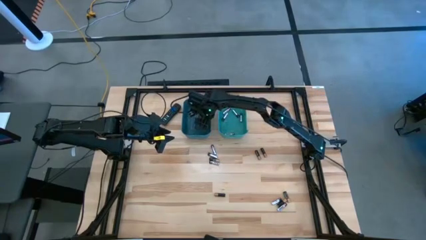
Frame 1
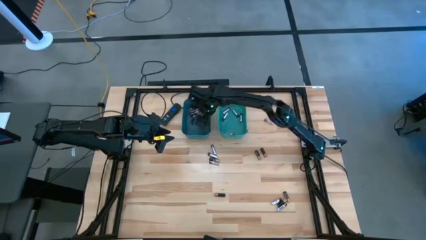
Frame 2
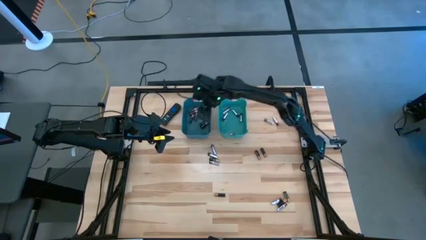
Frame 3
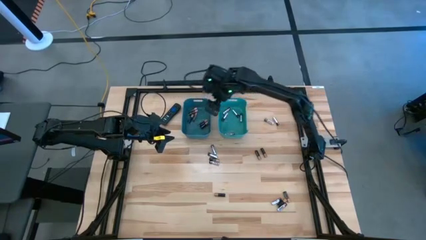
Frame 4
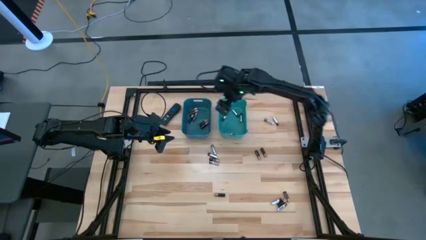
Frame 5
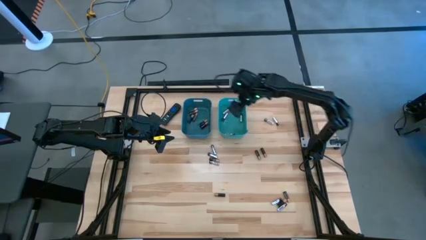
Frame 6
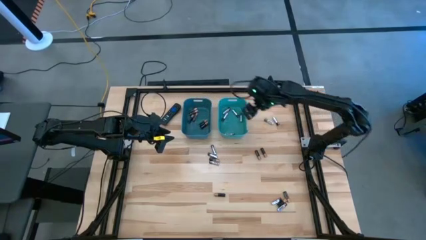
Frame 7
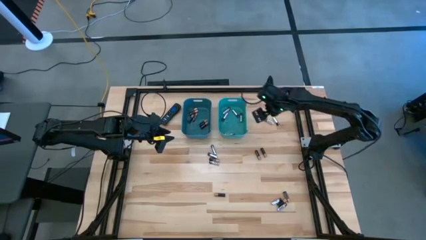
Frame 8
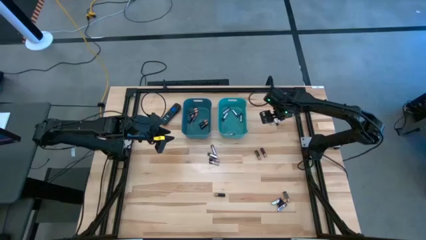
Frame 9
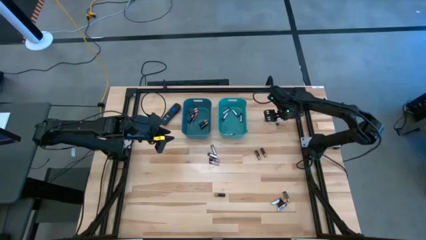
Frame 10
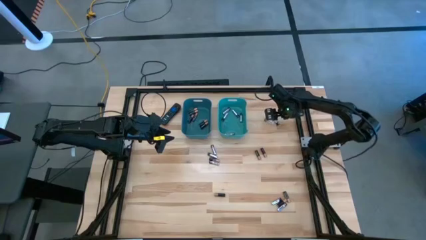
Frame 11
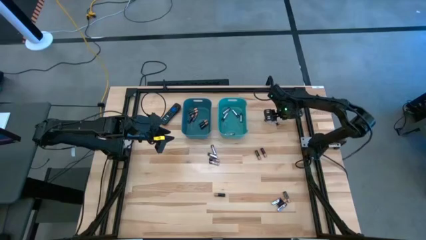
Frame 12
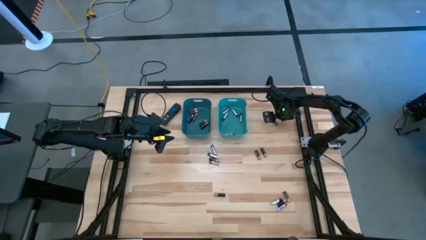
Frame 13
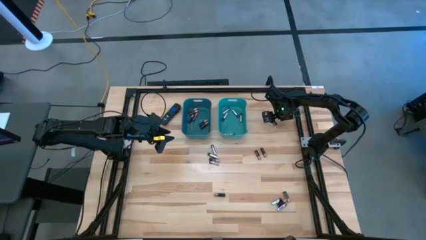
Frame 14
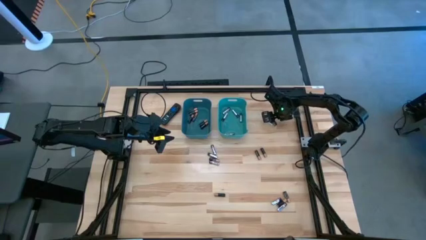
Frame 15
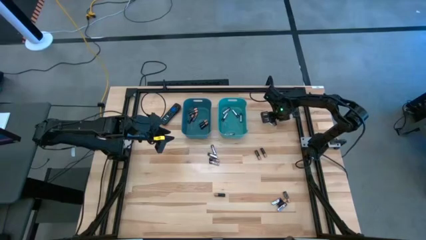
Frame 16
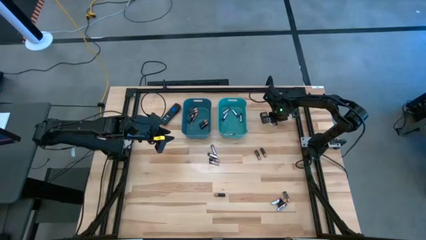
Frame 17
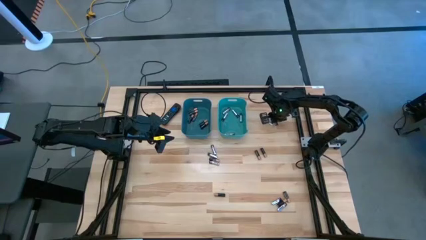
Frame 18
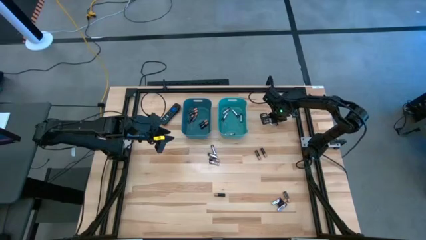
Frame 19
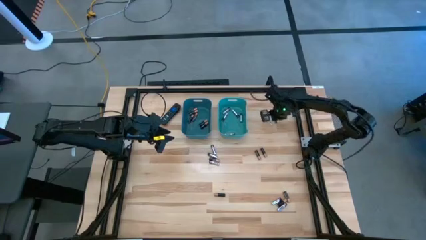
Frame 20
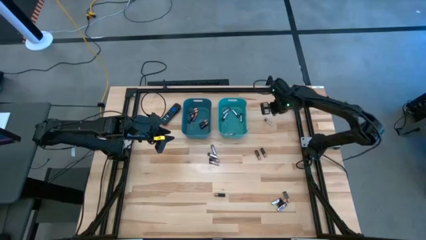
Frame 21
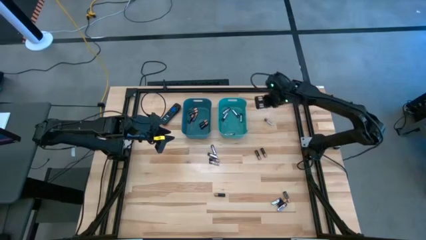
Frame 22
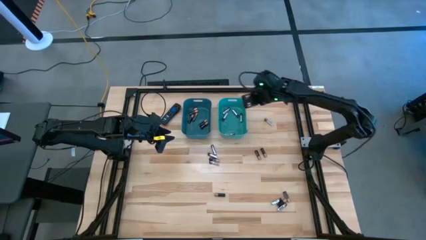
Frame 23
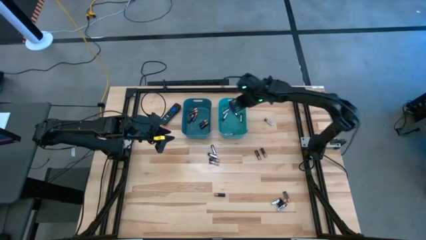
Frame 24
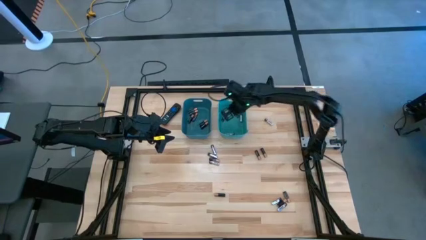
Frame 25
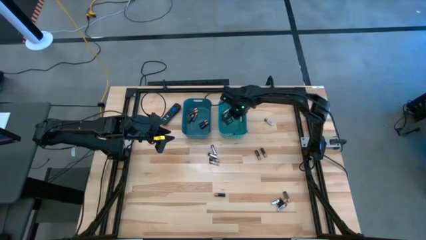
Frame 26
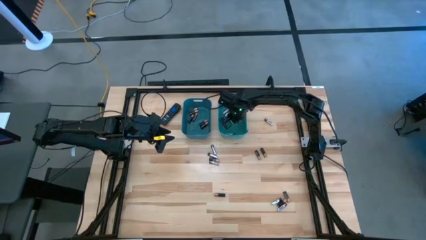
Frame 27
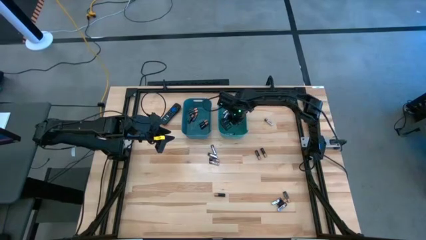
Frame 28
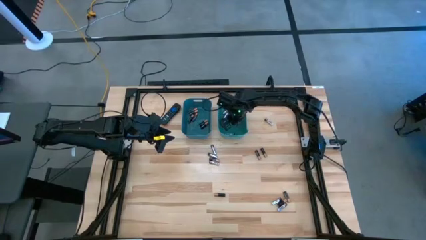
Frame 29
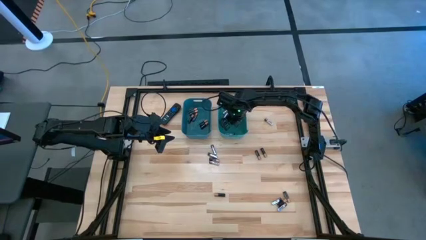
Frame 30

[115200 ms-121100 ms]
Task: Sort batteries
Put the silver battery into the green bin

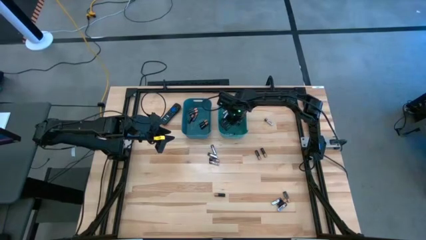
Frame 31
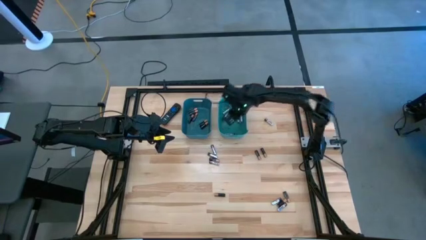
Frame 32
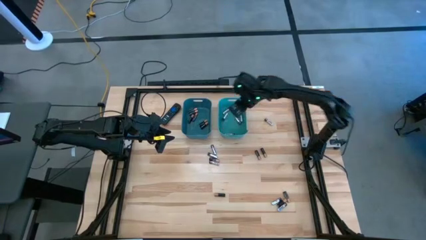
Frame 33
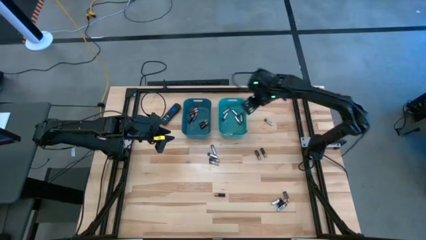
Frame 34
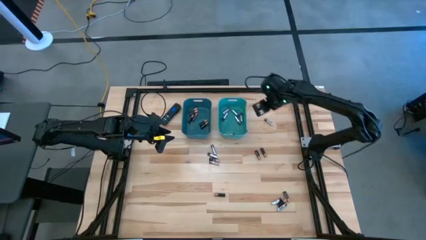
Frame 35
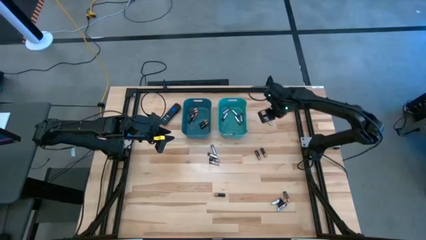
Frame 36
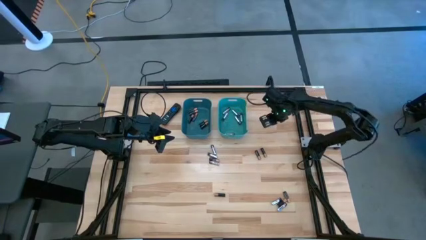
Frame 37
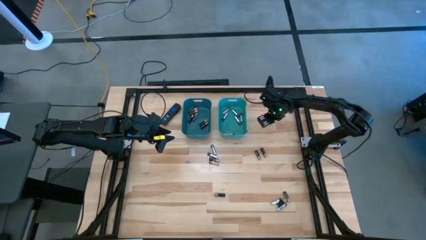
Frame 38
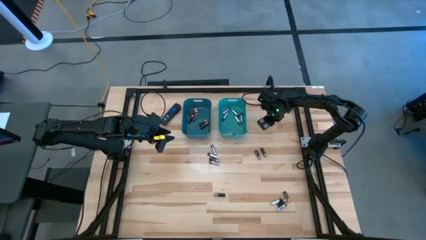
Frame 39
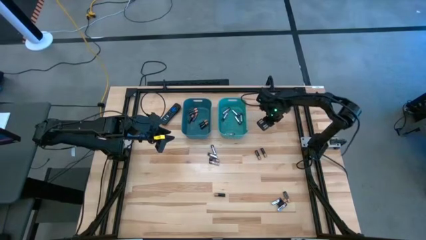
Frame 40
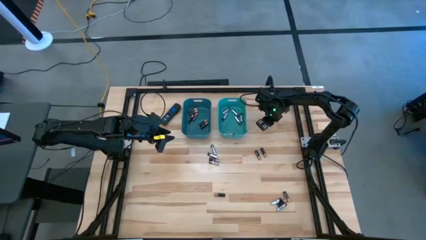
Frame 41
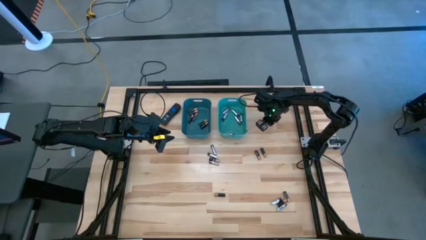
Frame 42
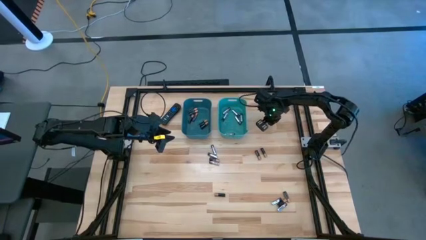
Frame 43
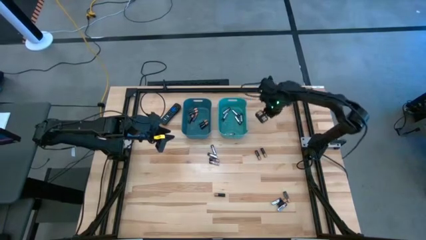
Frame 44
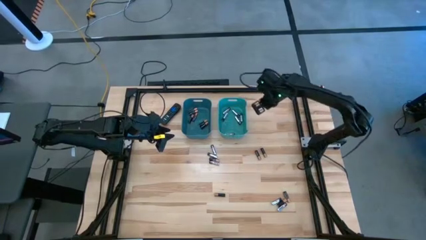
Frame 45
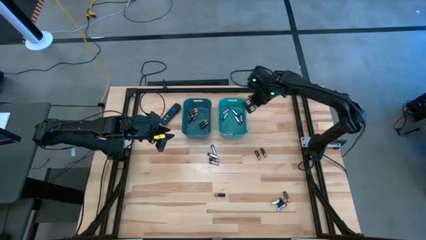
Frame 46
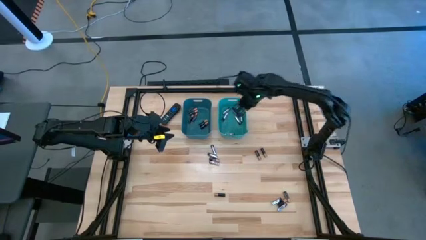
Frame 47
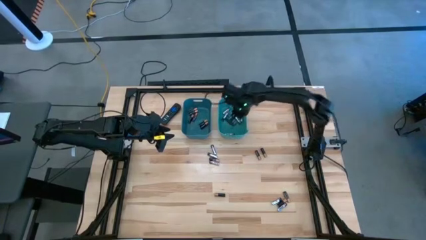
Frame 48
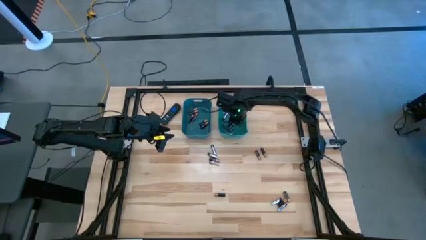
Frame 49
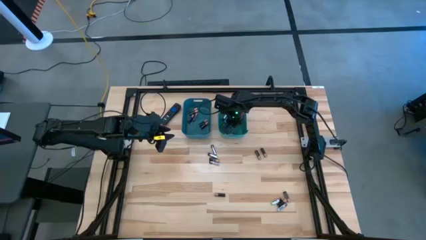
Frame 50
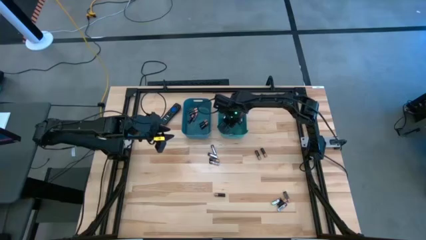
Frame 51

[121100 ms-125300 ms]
Put the silver battery into the green bin

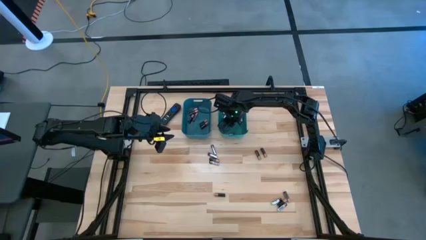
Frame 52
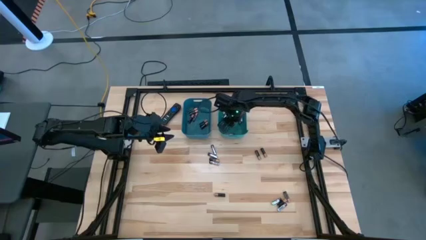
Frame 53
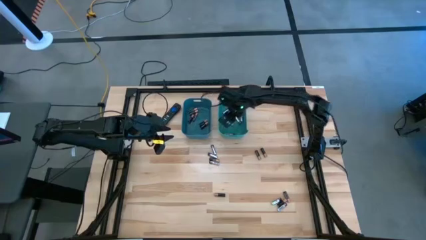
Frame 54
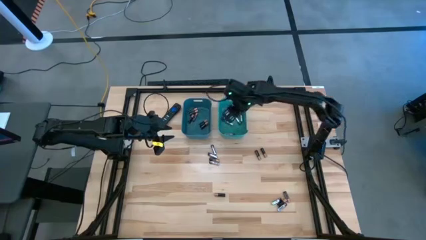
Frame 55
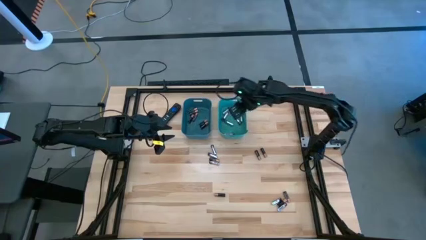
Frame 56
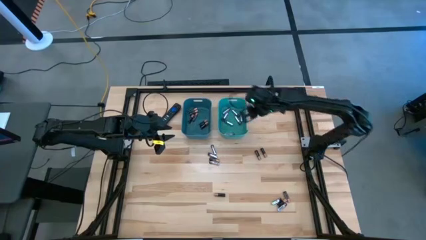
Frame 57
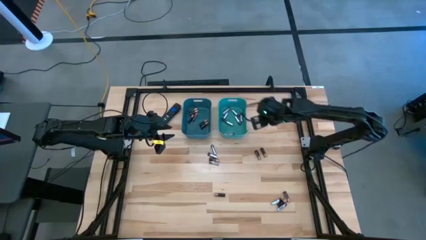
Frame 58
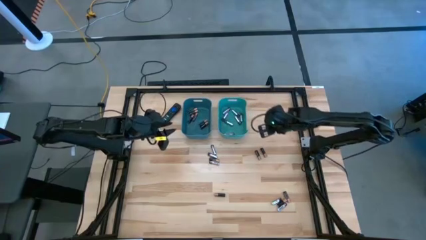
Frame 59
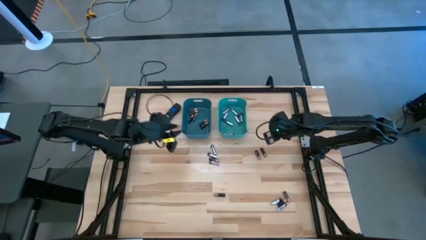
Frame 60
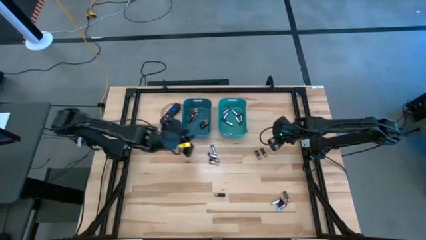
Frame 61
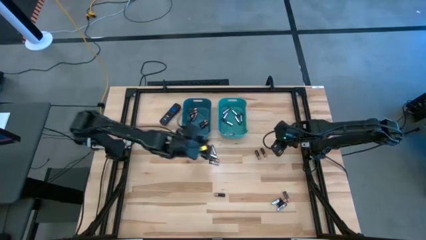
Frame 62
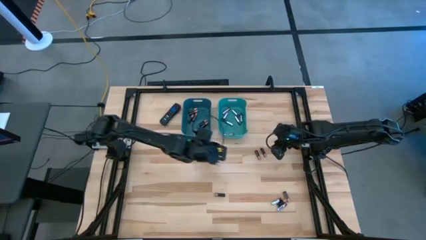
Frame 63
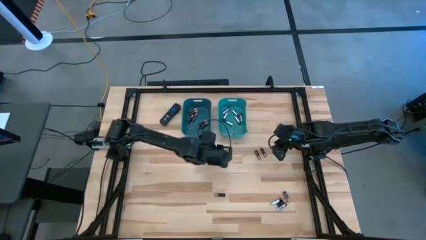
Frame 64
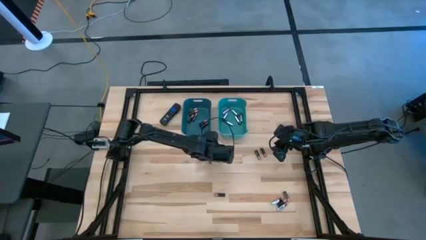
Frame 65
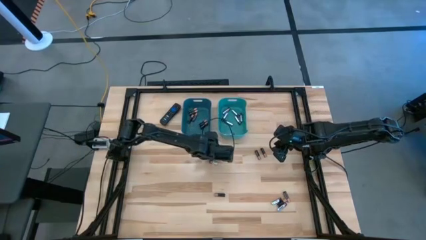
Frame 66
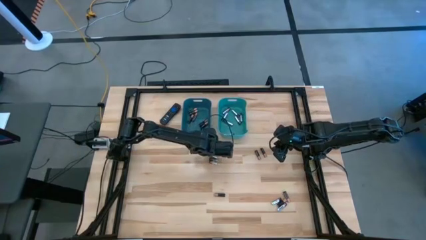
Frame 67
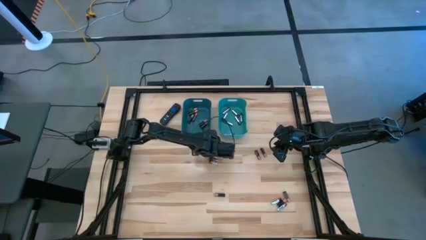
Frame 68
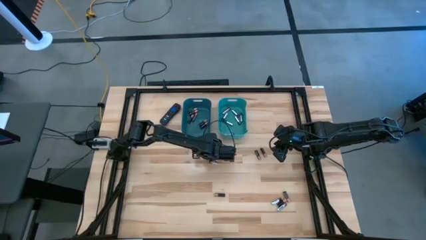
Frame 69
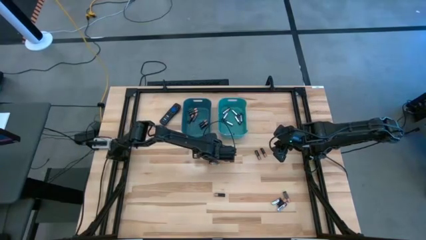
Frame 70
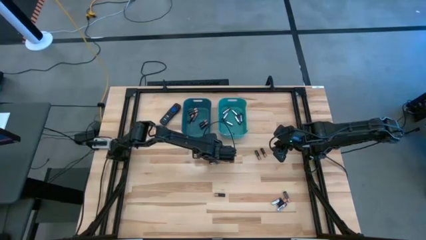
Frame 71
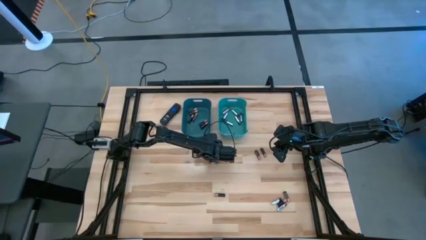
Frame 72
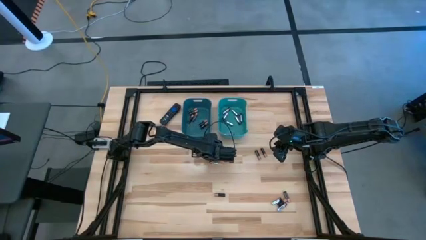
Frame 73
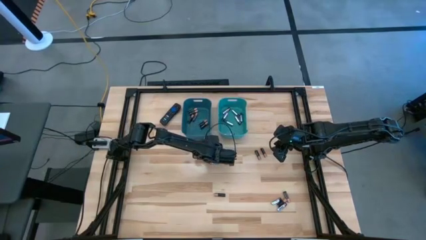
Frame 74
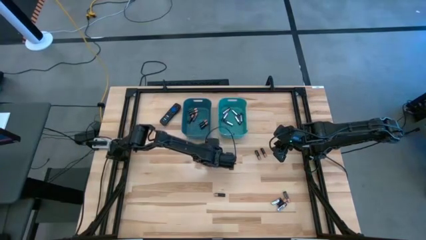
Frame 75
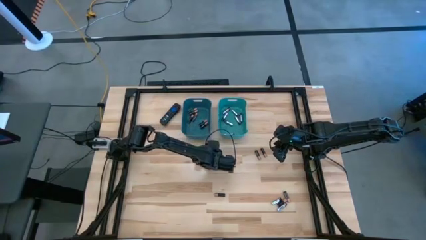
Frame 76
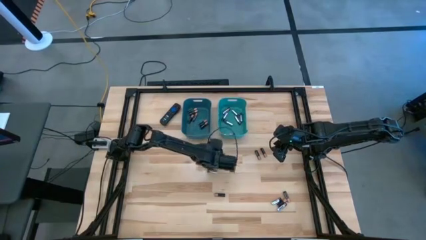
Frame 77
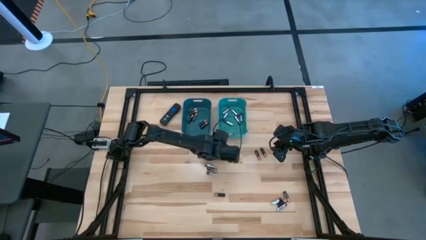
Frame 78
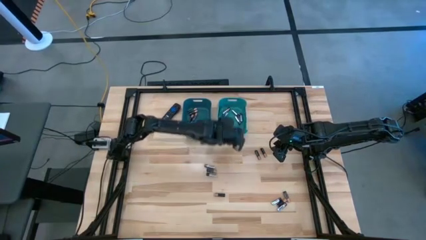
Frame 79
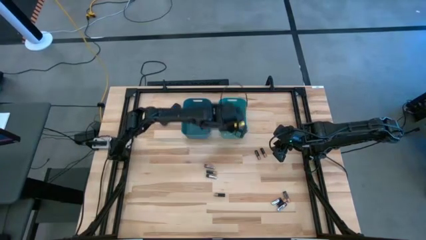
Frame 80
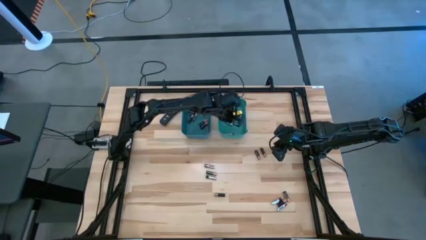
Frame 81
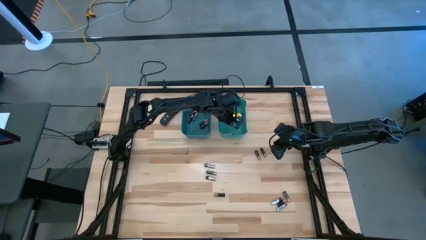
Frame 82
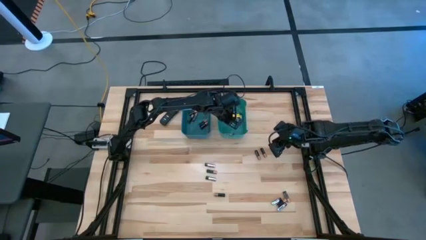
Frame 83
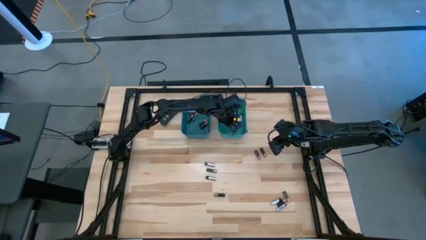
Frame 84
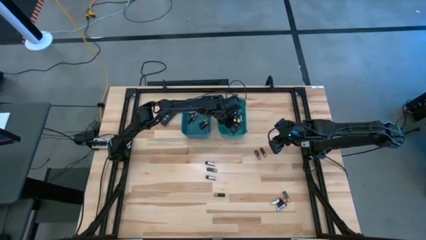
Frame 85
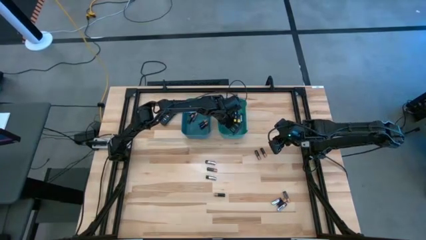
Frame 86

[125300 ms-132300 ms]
Put the silver battery into the green bin
